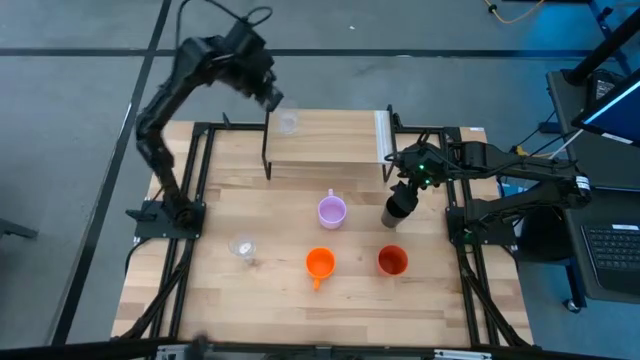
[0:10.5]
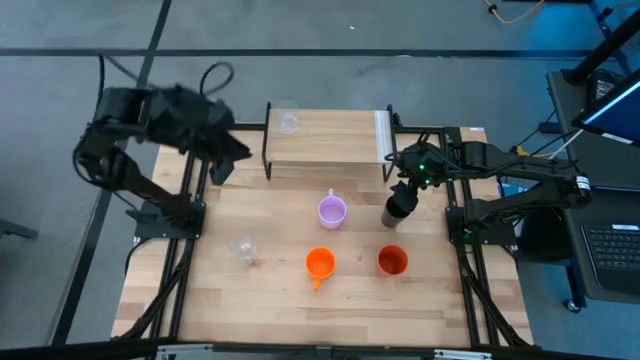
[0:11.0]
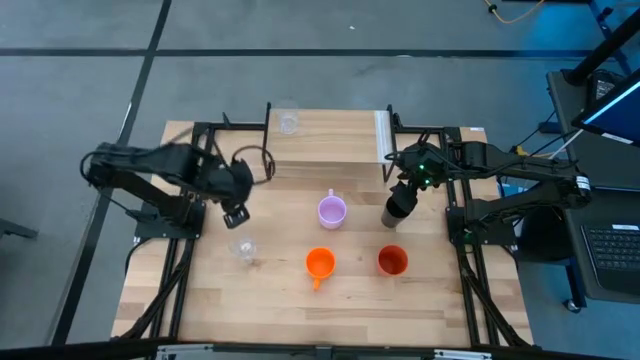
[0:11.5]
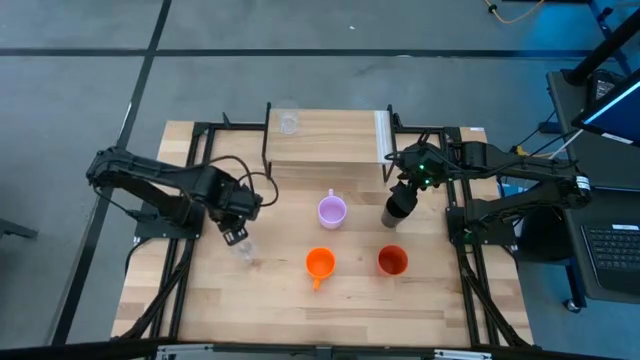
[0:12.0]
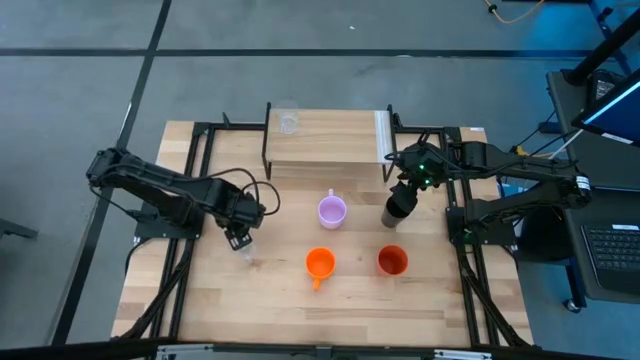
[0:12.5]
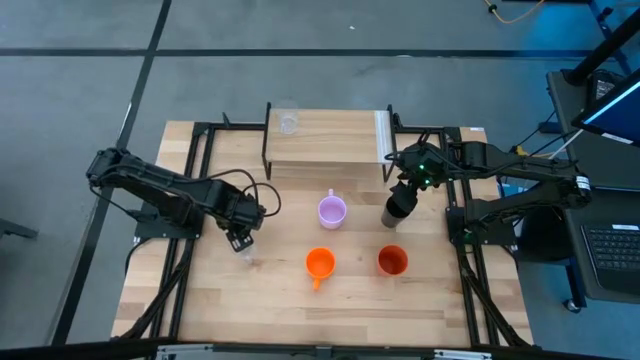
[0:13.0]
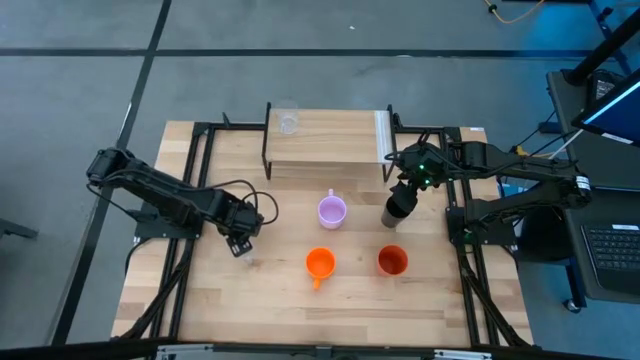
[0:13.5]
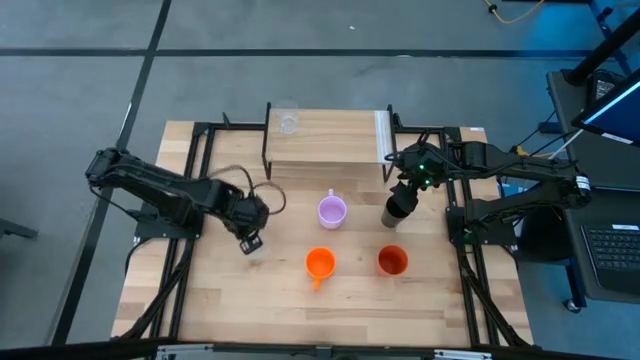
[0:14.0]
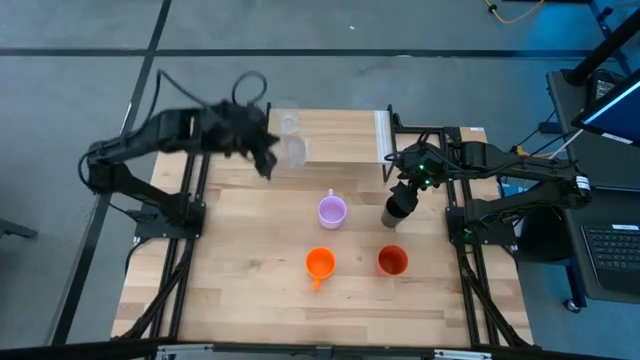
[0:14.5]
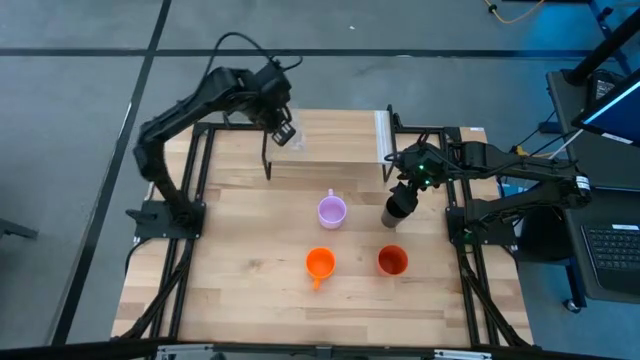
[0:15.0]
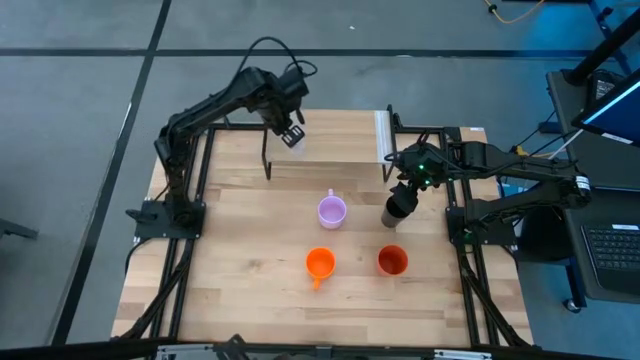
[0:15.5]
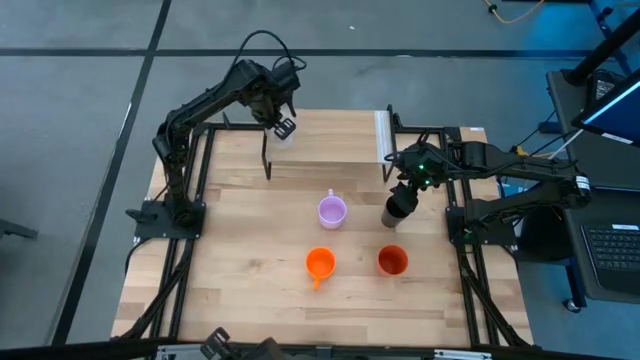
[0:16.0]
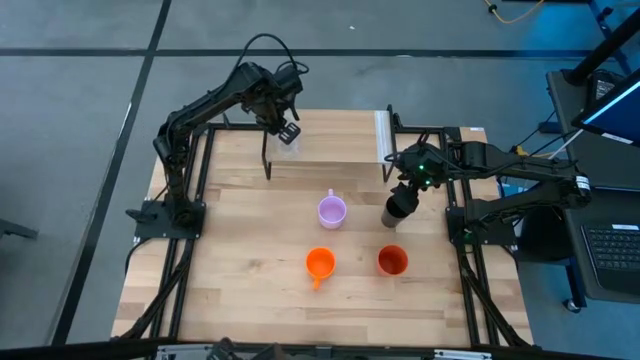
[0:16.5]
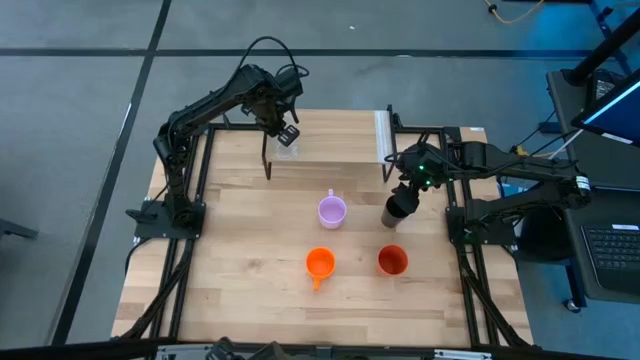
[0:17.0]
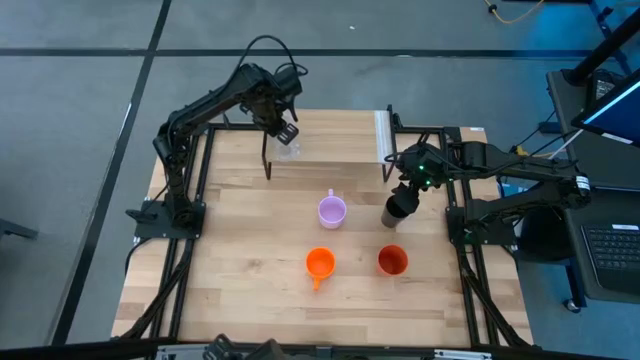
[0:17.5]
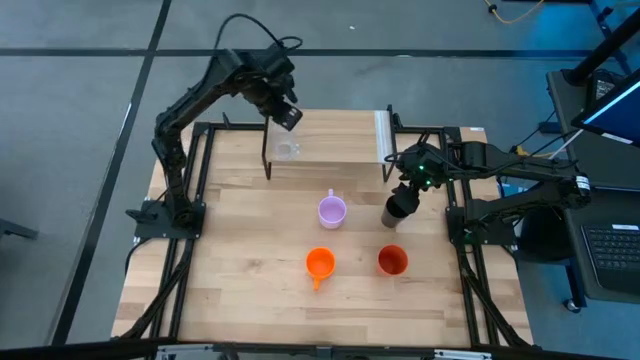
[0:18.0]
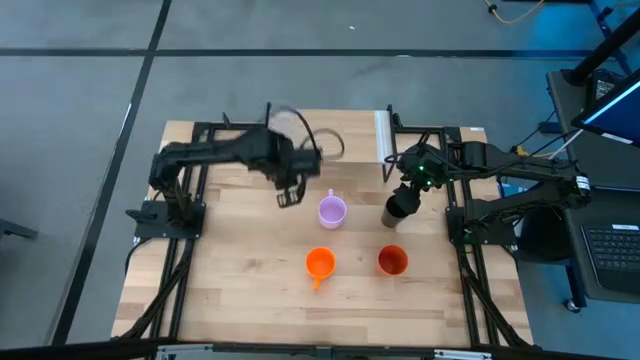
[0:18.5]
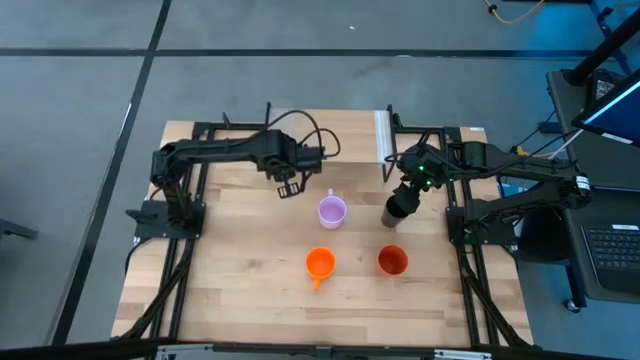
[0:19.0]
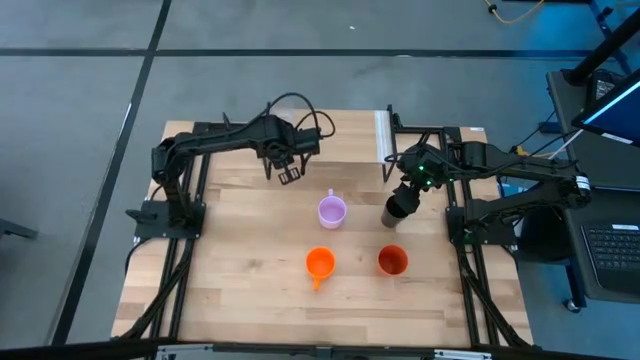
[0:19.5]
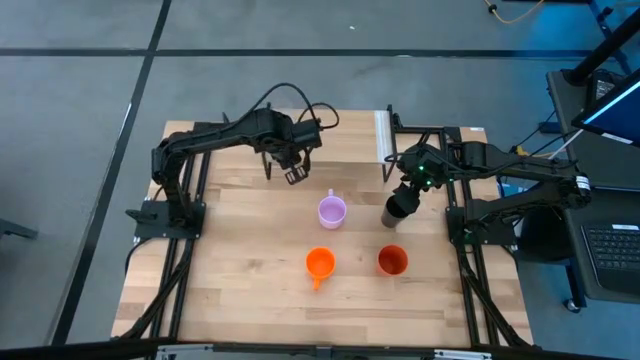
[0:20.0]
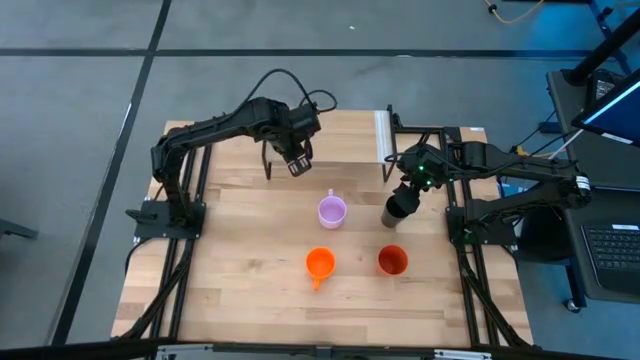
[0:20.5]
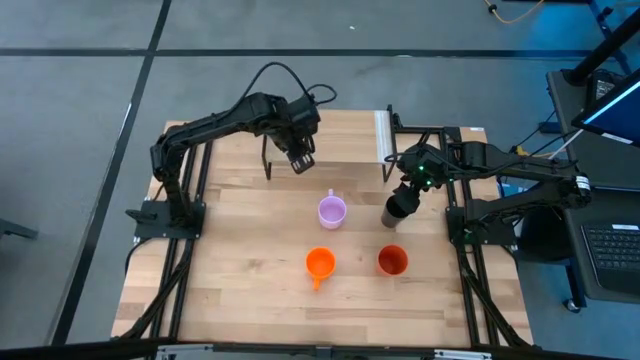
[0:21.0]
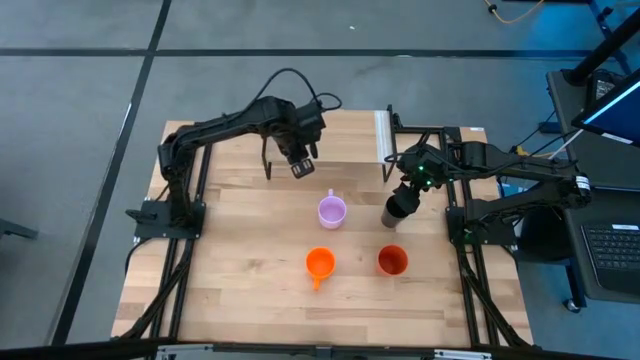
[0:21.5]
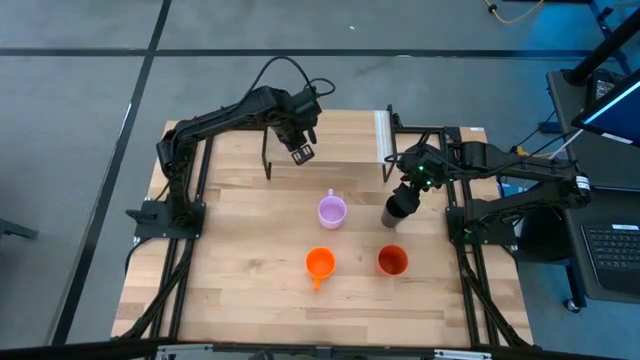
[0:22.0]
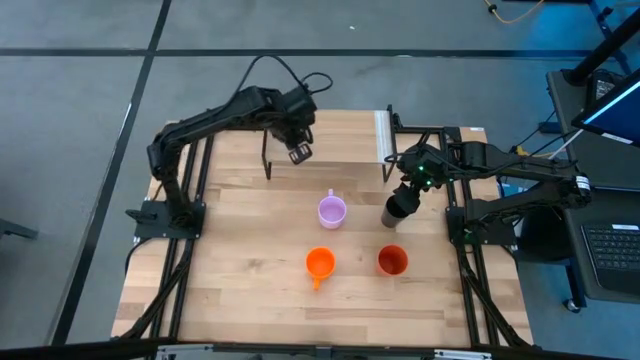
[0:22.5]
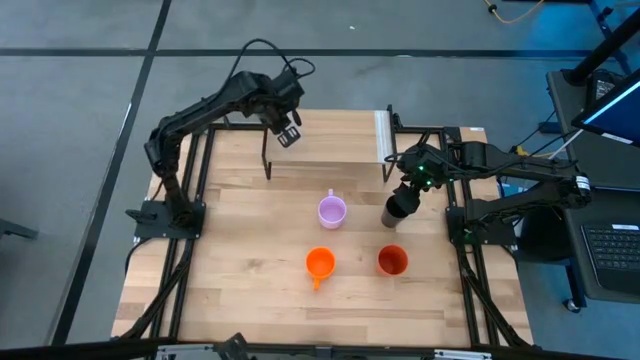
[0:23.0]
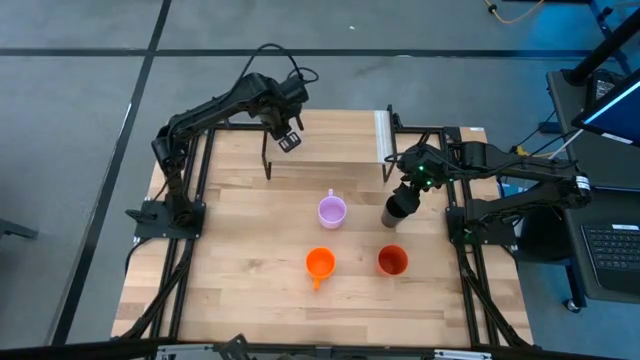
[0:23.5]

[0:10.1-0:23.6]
Task: Stack small to large cups/mugs on shelf
Put the transparent mug on the shelf

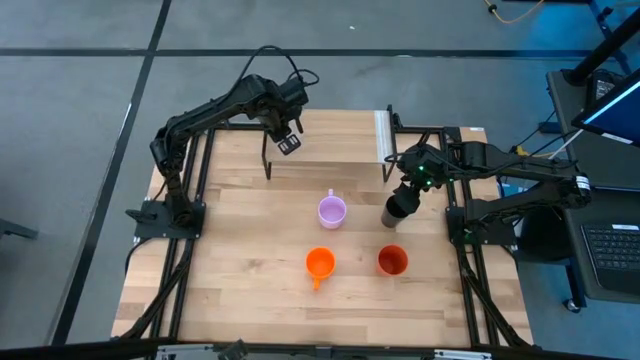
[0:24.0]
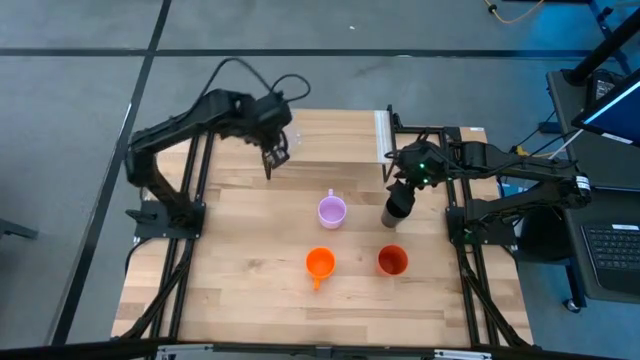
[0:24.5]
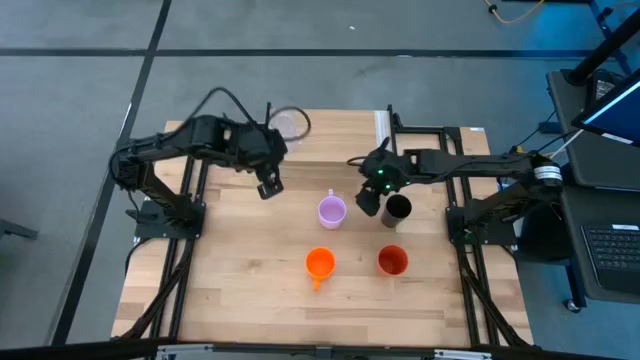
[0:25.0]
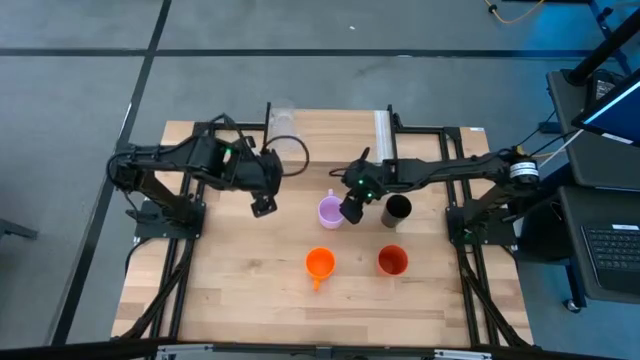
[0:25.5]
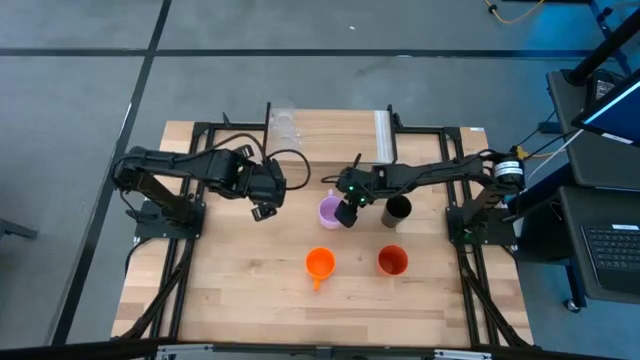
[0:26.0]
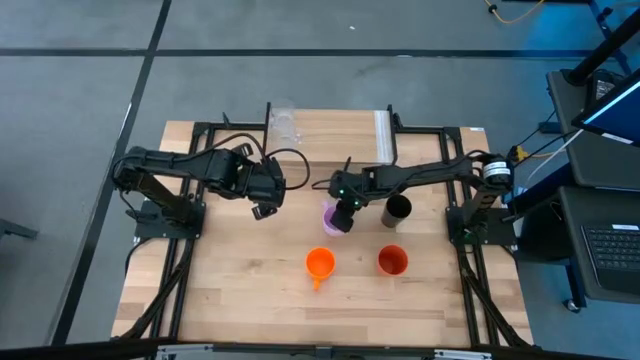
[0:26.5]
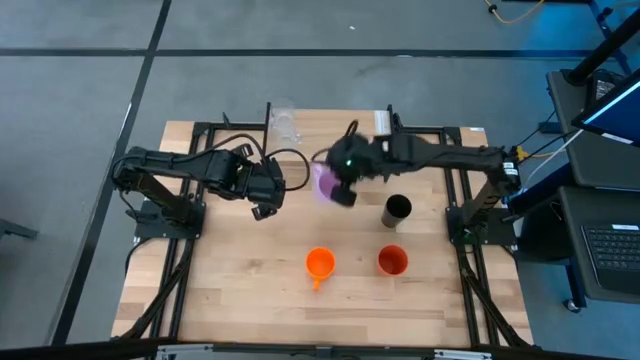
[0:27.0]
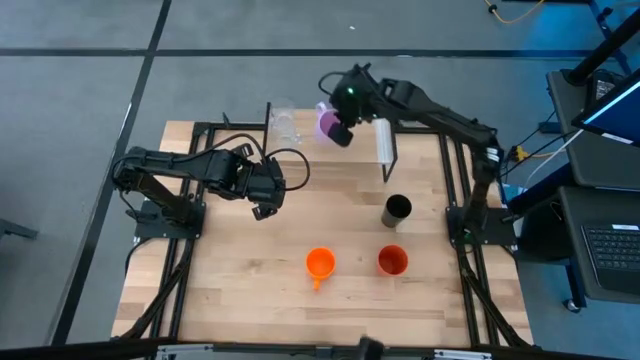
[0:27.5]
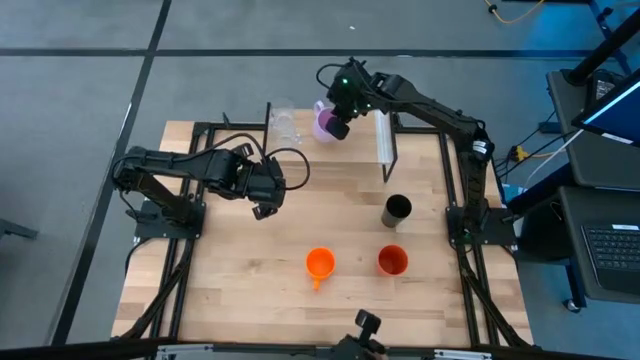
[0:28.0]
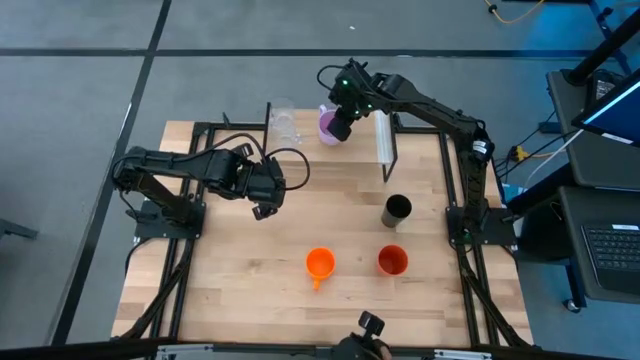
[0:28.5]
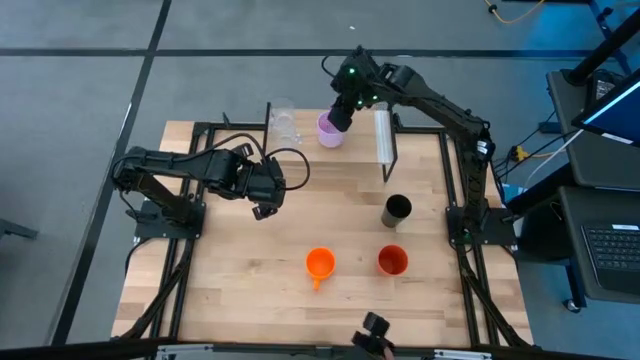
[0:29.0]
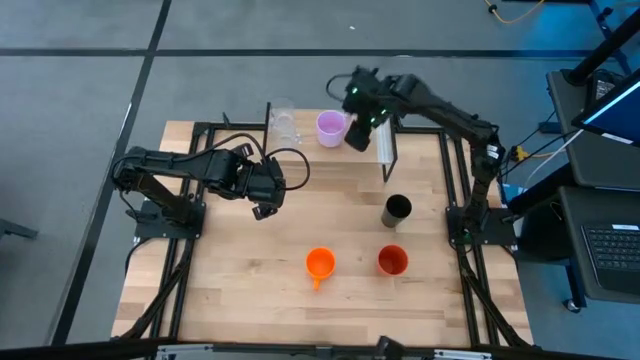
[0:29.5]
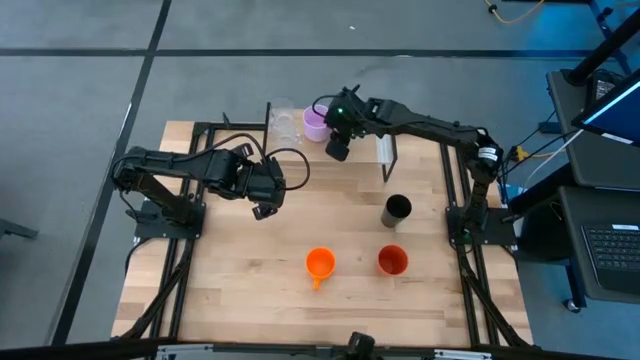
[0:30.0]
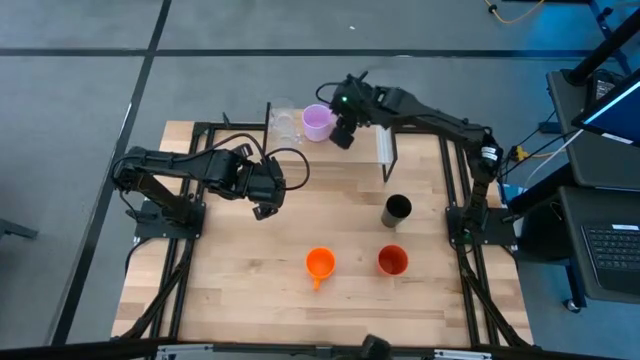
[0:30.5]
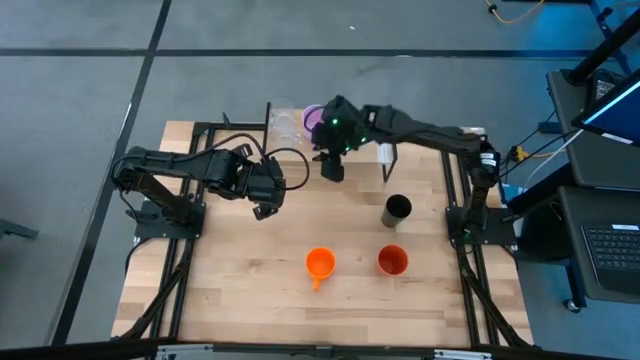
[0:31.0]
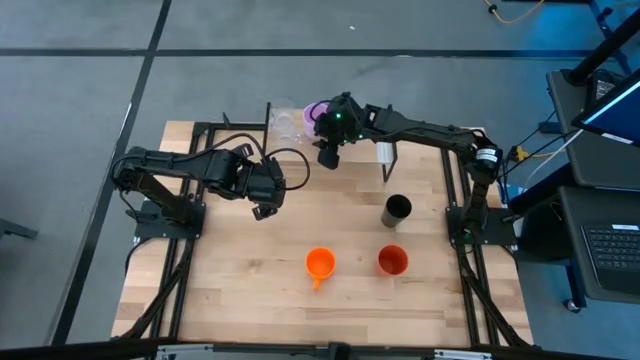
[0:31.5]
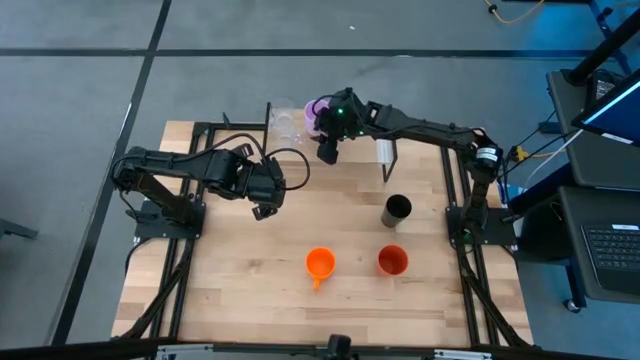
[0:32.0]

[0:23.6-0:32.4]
Put the pink mug on the shelf
